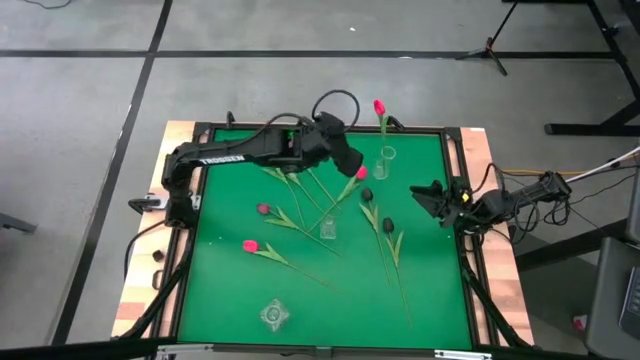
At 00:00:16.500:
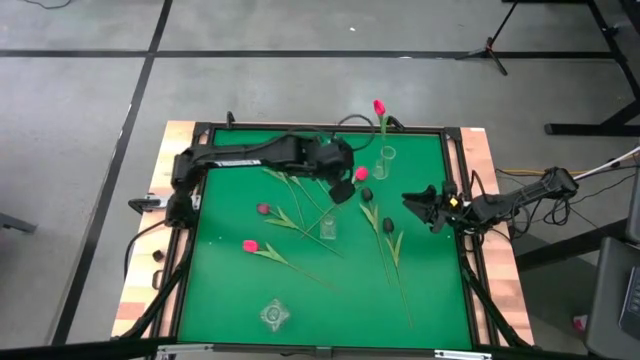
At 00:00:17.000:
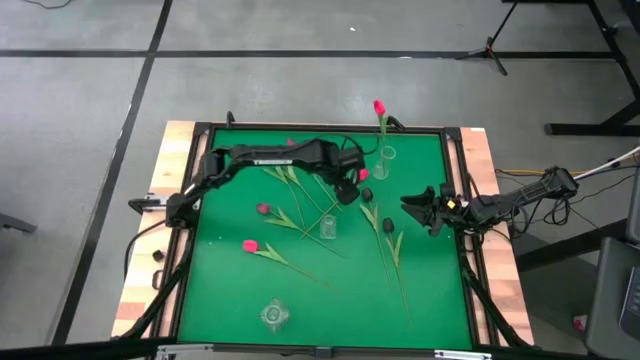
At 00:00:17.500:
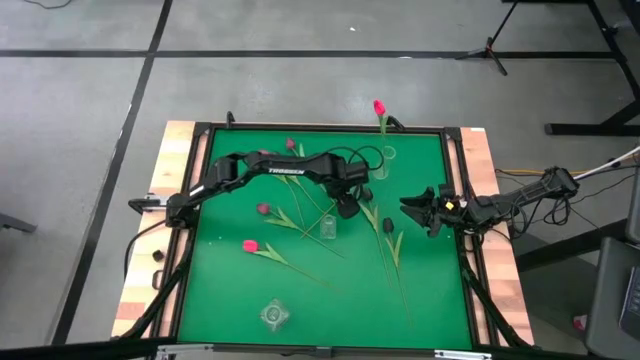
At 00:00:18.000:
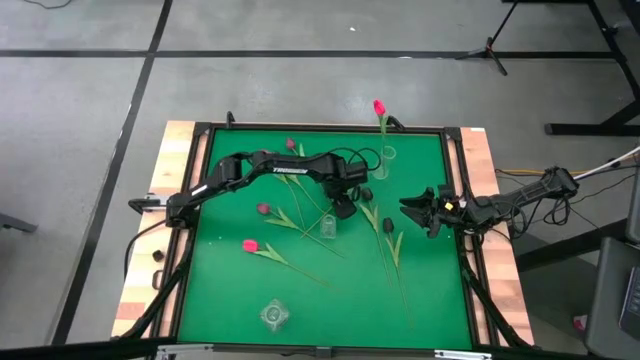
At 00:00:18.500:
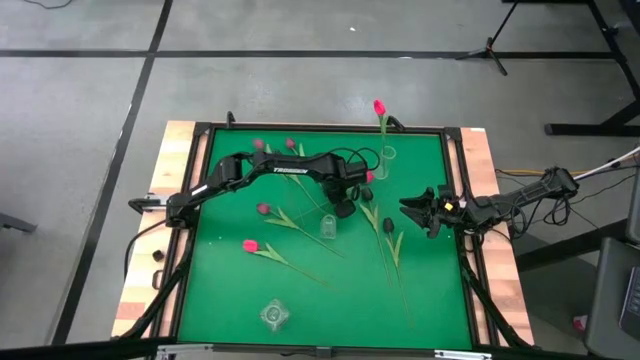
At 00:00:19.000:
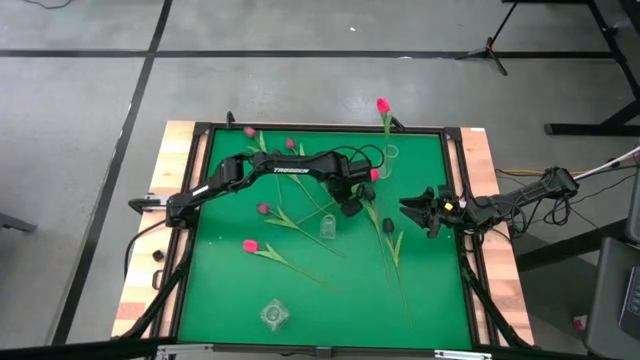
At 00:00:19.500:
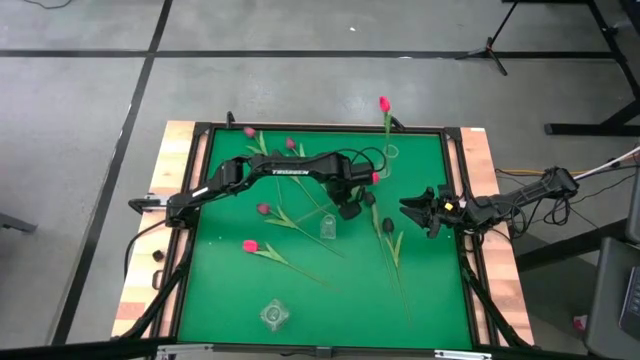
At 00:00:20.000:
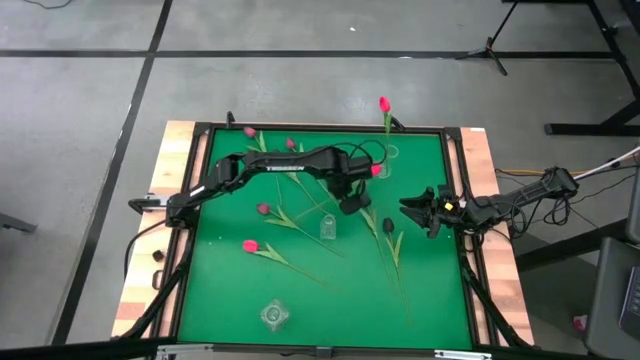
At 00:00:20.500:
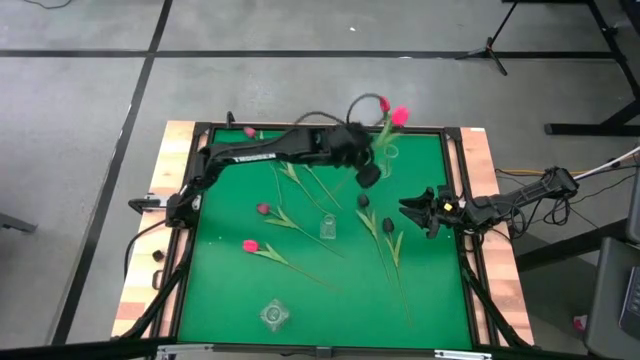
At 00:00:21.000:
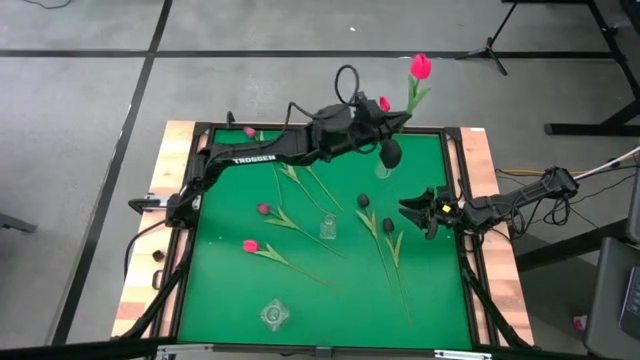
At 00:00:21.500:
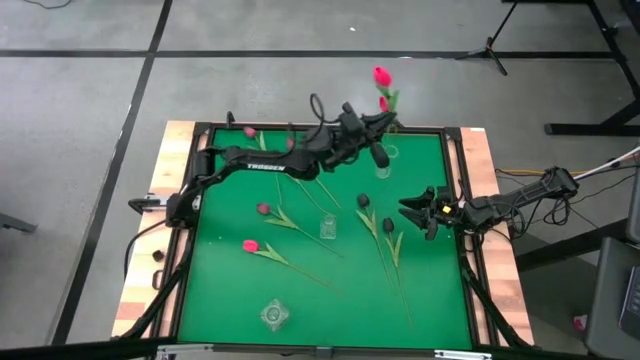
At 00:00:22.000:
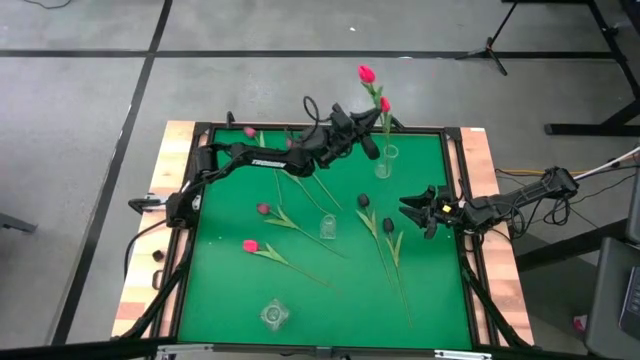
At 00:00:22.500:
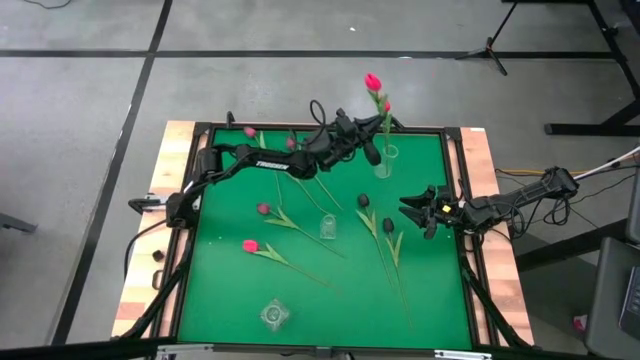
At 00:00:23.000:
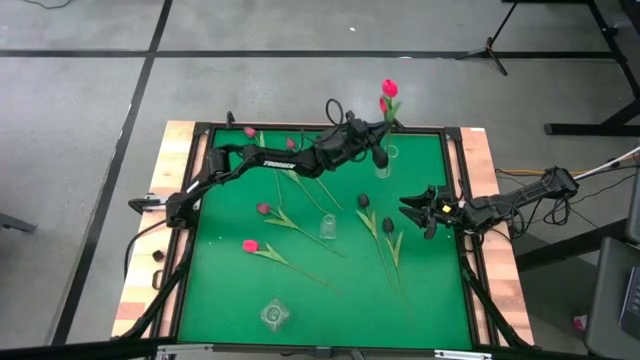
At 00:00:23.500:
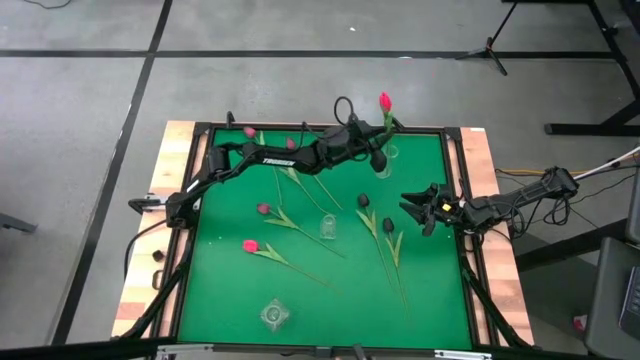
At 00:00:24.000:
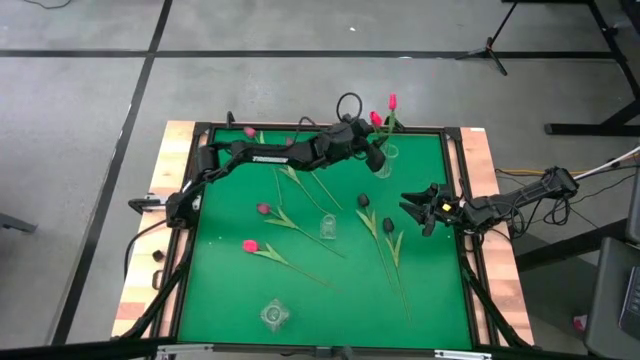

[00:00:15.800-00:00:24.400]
Task: Sort flowers into vase by color
Put the top pink tulip into the top transparent vase

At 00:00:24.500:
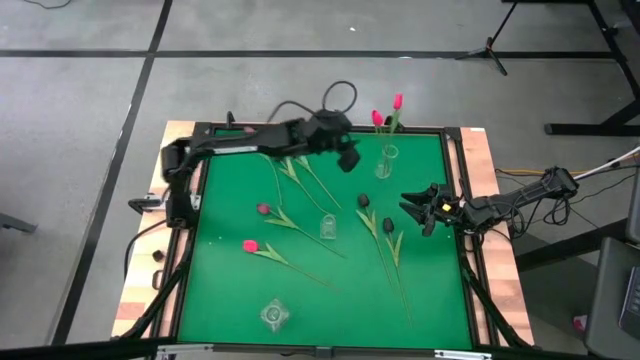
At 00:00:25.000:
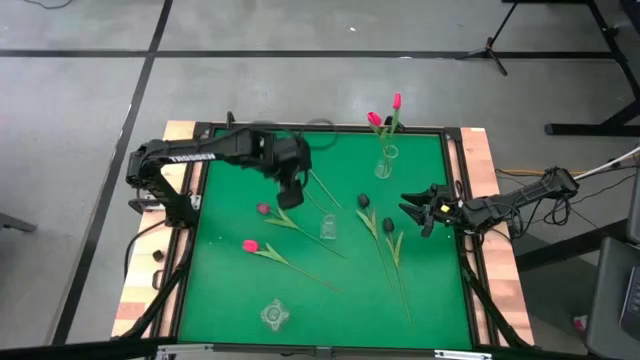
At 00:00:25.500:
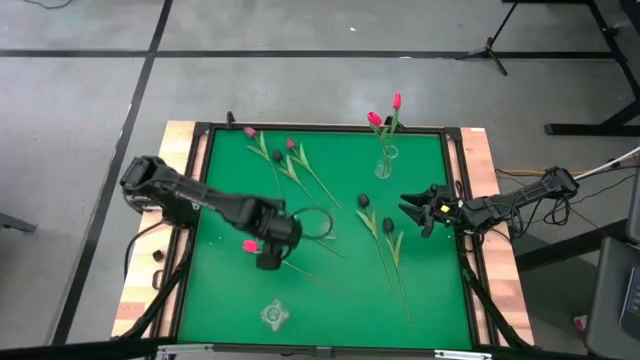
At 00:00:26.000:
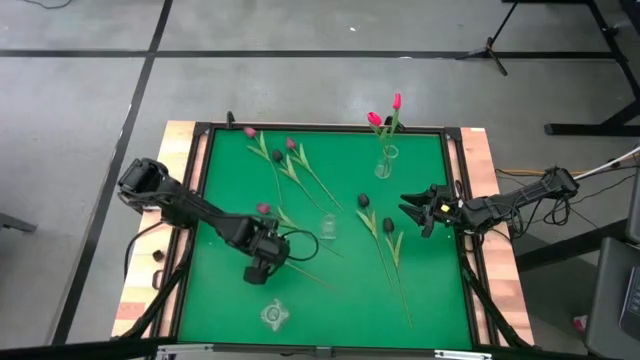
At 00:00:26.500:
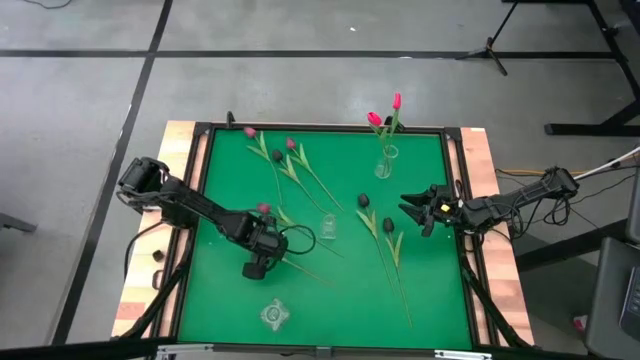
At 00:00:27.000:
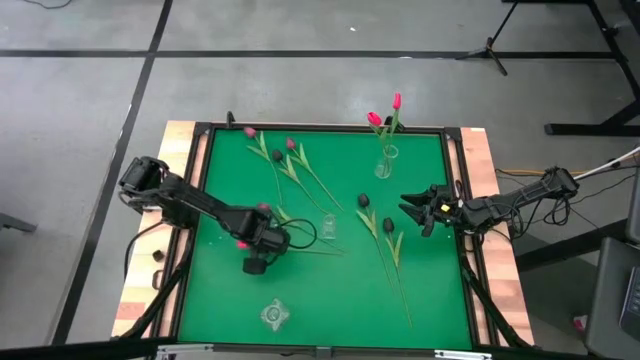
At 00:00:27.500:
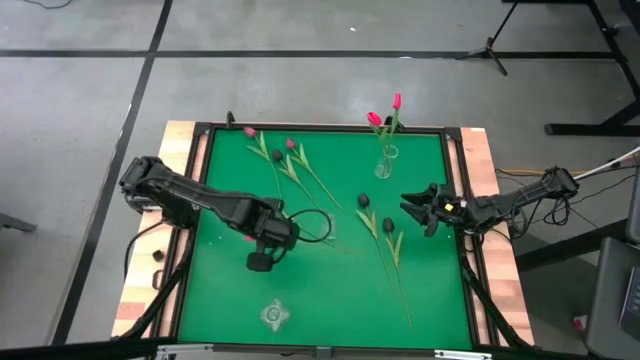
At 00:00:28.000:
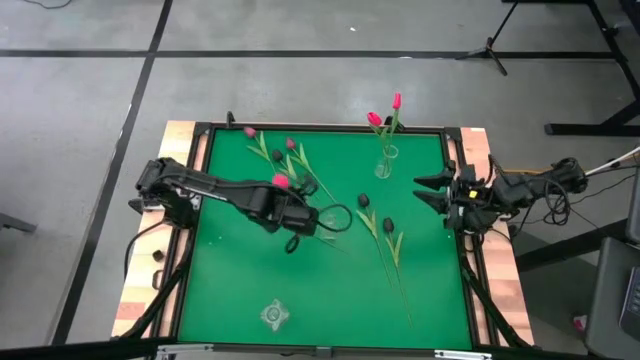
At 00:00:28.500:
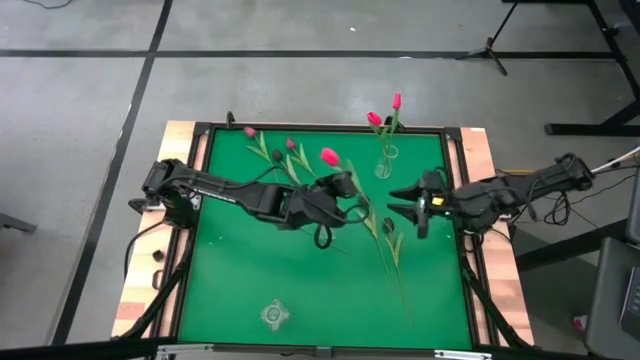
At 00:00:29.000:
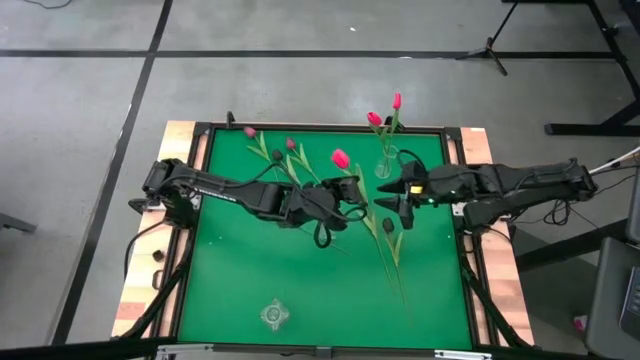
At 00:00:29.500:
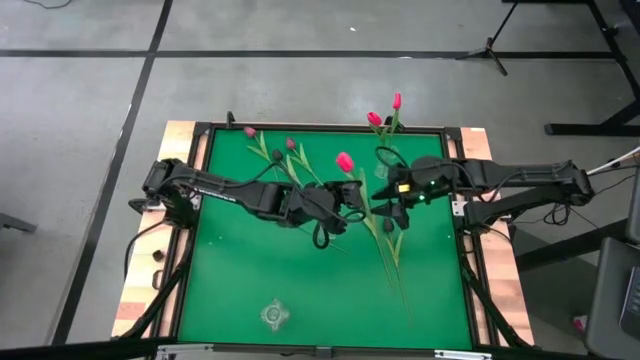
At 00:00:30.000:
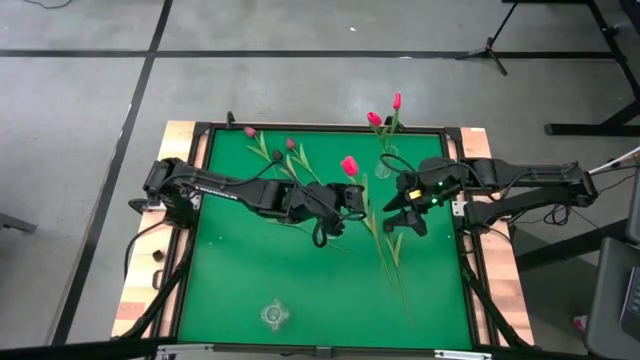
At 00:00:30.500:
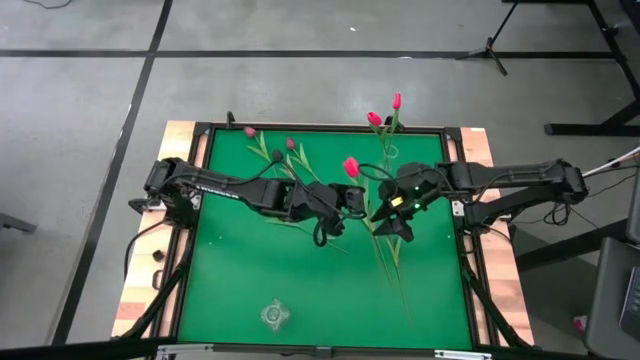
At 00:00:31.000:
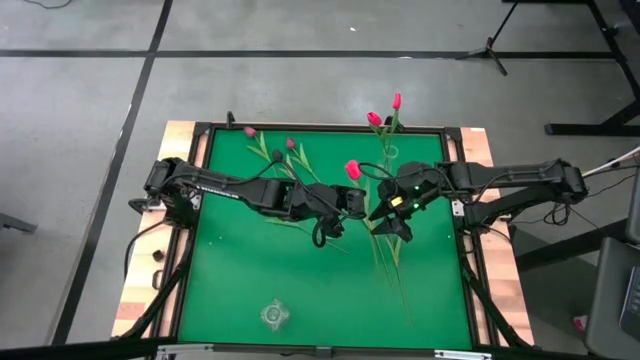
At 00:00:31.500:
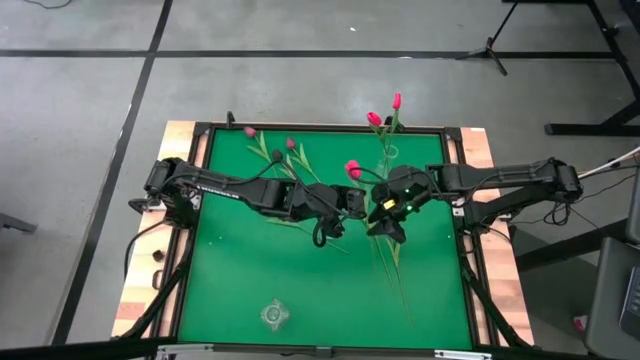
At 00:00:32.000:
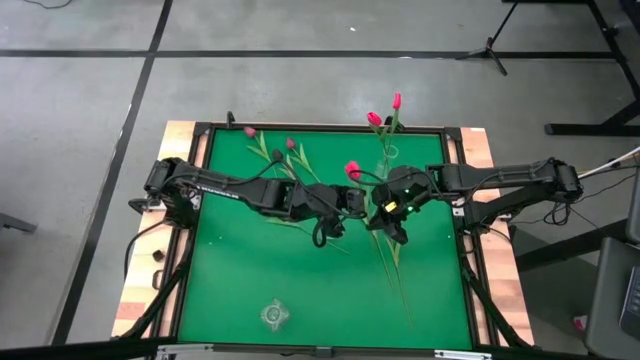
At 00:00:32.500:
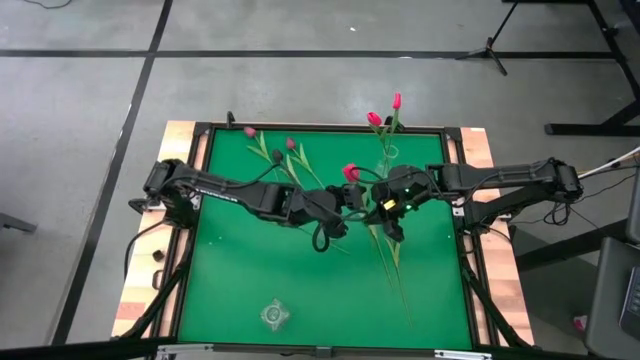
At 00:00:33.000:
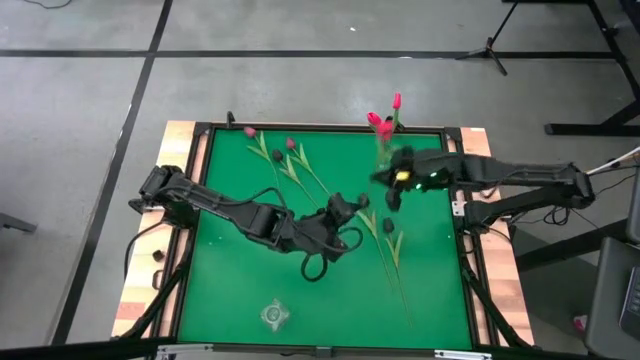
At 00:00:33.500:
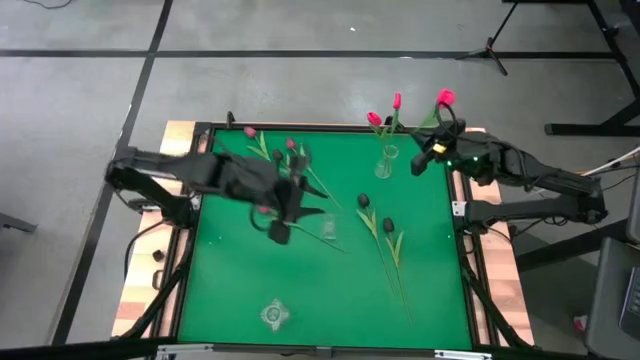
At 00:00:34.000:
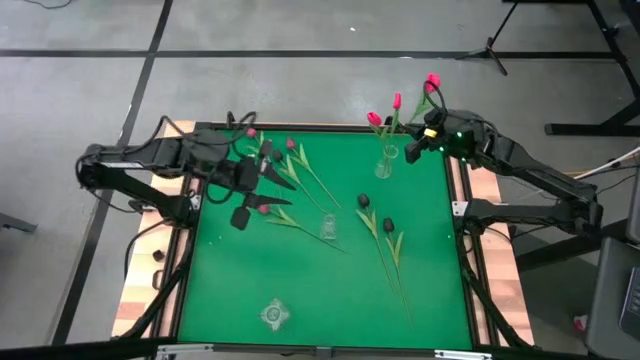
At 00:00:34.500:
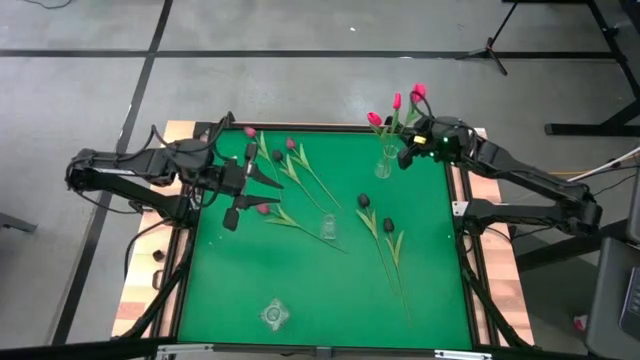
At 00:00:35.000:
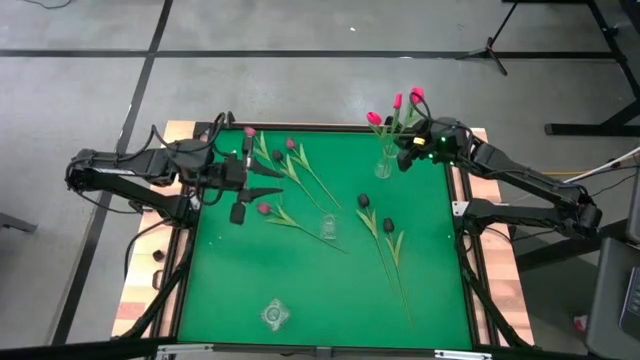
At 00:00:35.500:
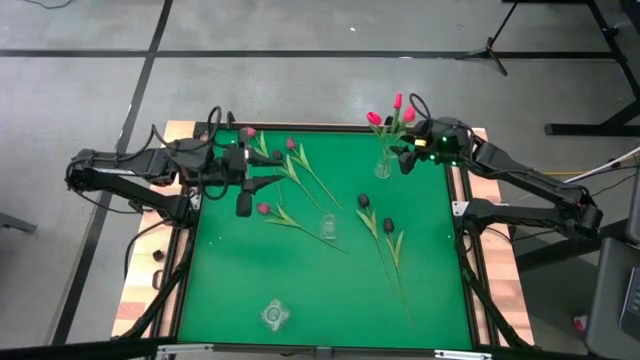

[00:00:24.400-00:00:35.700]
Put the pink tulip into the top transparent vase
